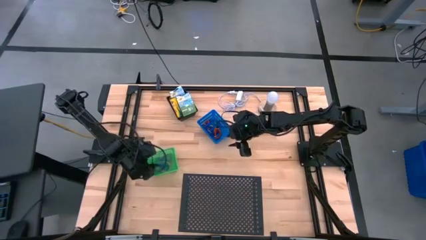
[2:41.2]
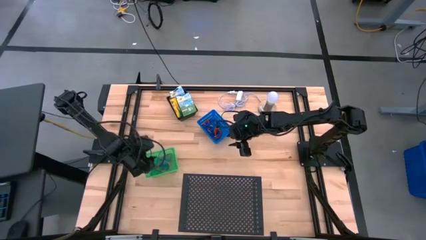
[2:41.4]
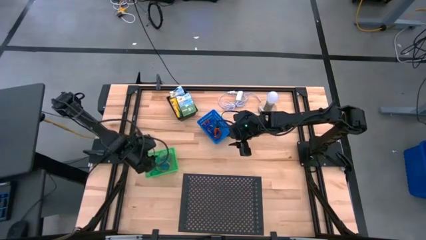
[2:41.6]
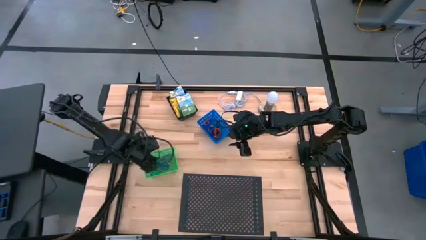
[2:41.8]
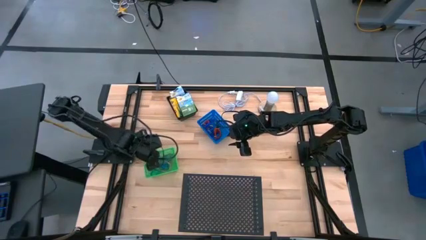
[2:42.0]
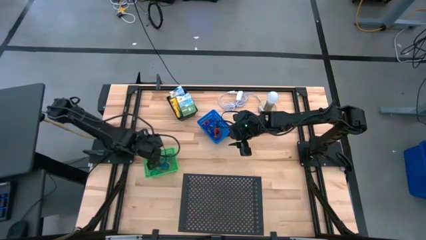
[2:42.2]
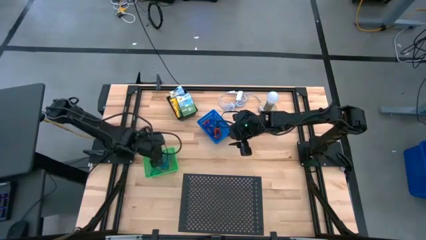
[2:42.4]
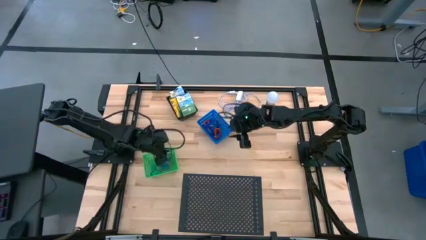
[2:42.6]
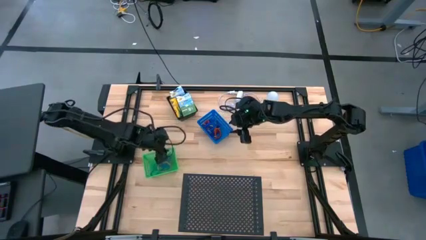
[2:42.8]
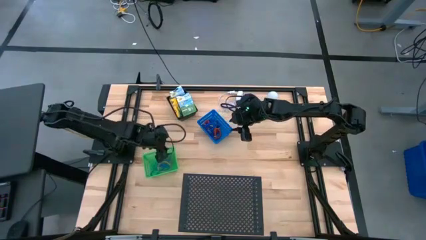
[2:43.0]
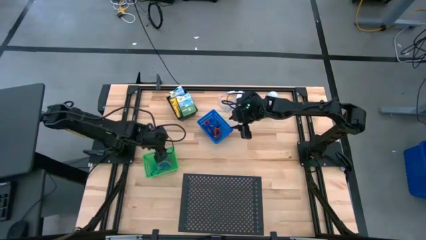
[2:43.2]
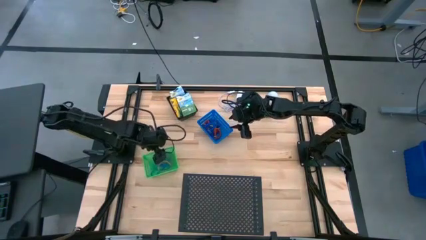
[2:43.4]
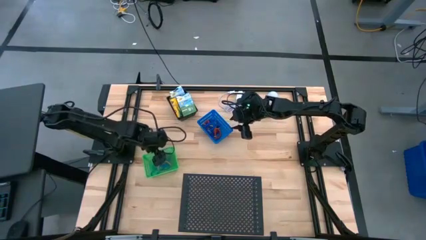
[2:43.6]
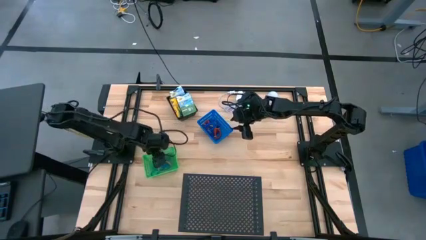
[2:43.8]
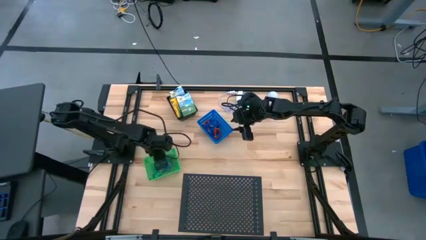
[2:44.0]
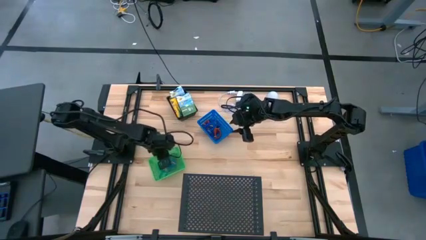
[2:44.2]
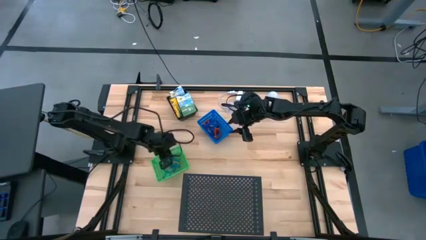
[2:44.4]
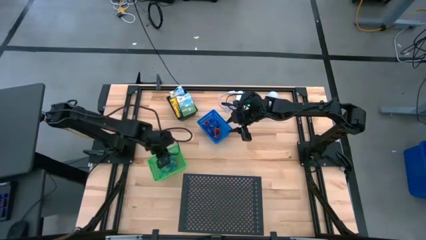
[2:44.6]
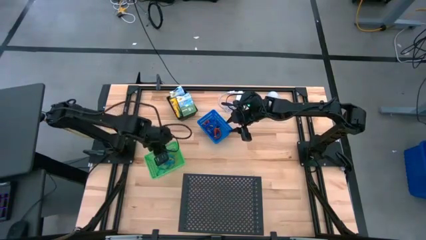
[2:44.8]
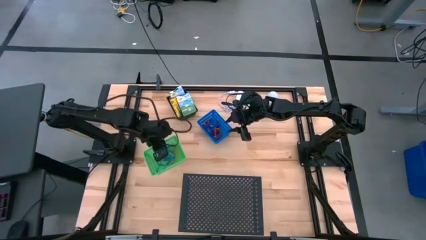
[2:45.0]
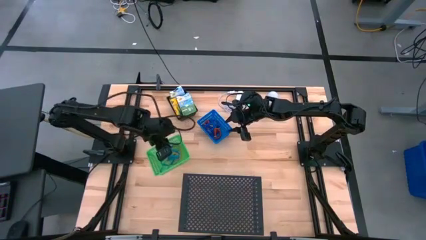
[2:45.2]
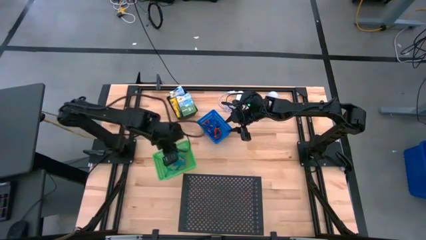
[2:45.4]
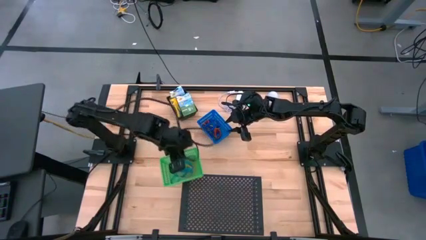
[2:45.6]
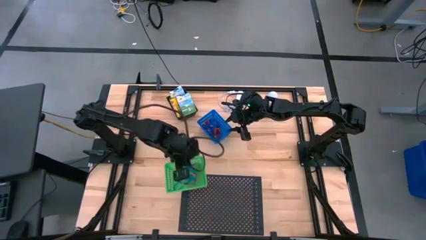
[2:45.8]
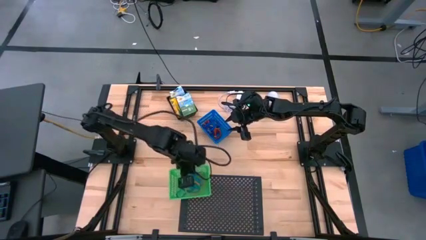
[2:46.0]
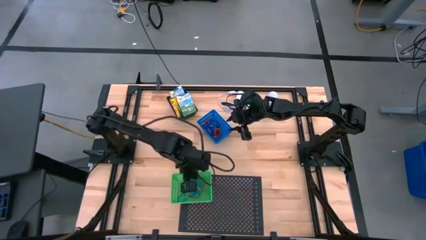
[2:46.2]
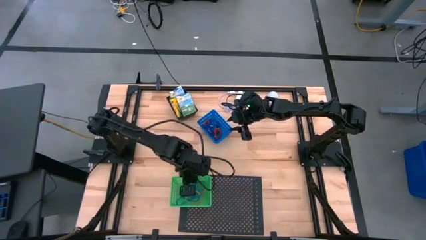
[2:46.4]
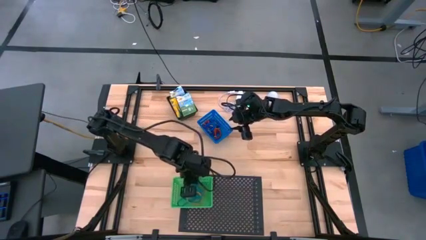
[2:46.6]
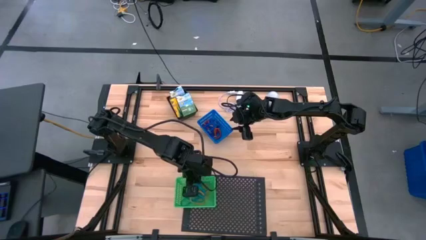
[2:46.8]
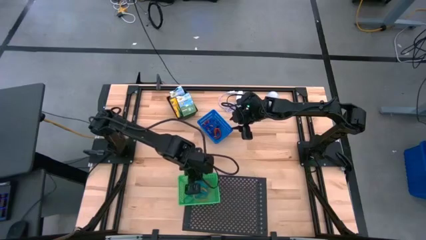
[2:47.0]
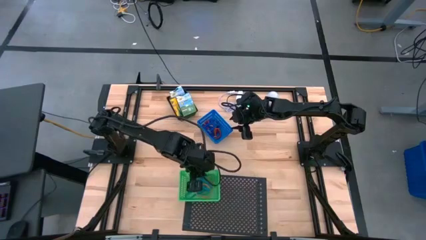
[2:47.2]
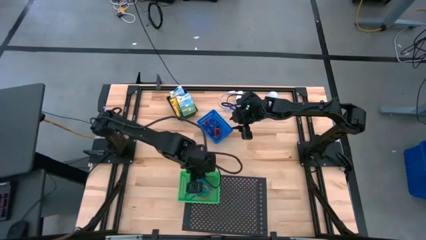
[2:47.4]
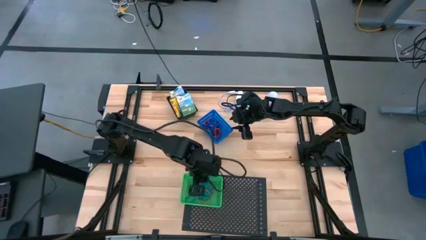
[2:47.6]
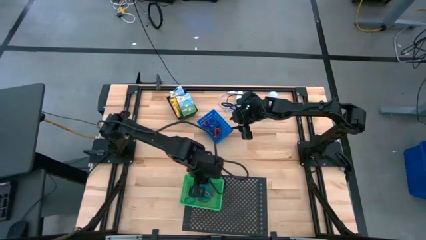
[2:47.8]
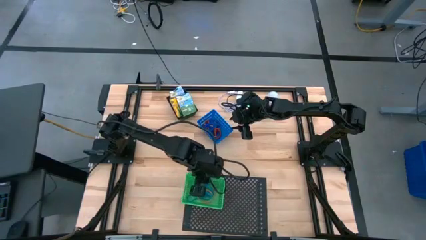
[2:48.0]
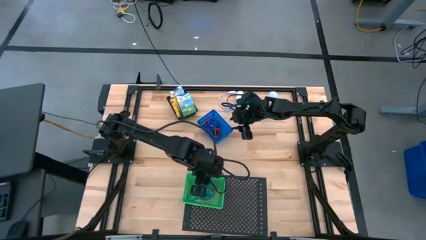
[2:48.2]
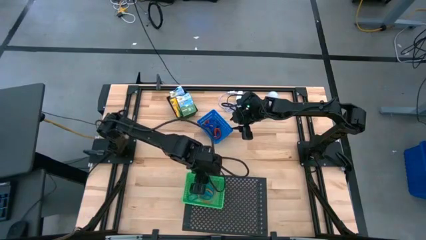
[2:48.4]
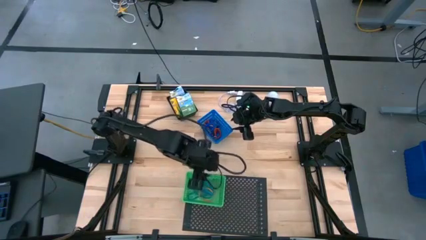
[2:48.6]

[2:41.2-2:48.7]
Task: Pick & Place Office Desk Supplies
Put the green bin on the shelf

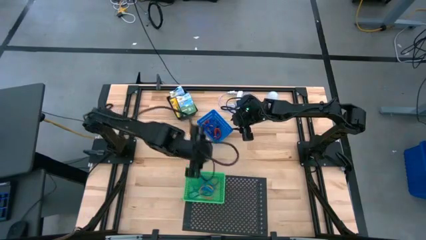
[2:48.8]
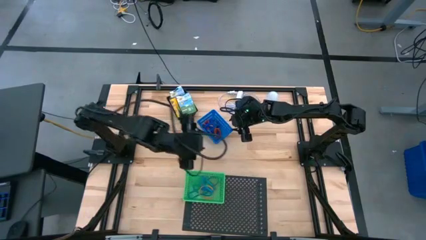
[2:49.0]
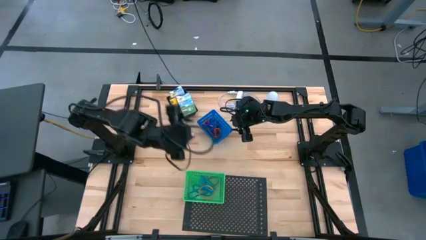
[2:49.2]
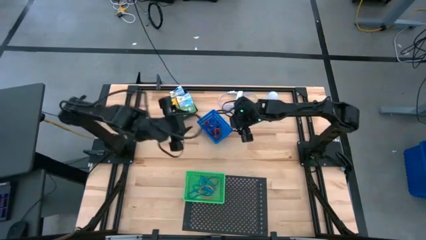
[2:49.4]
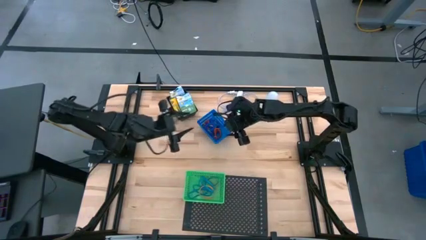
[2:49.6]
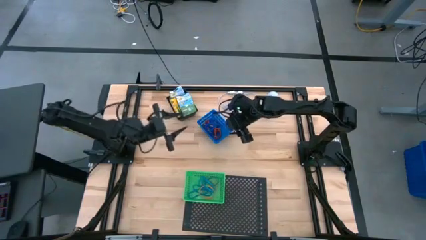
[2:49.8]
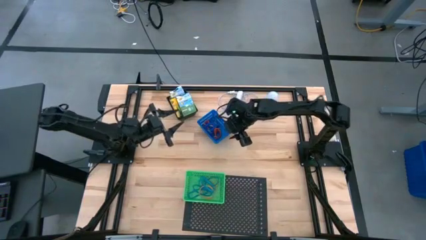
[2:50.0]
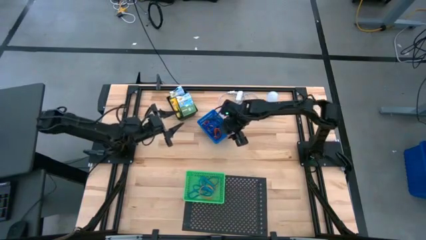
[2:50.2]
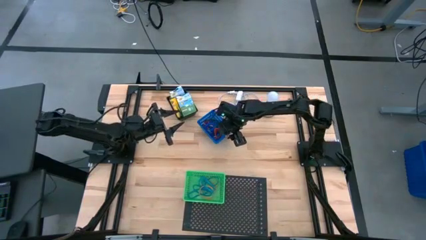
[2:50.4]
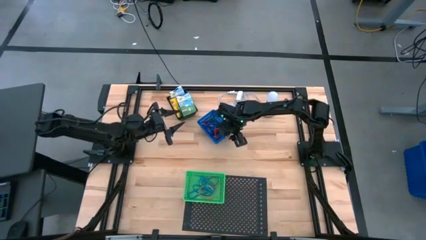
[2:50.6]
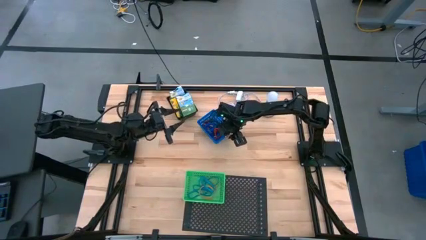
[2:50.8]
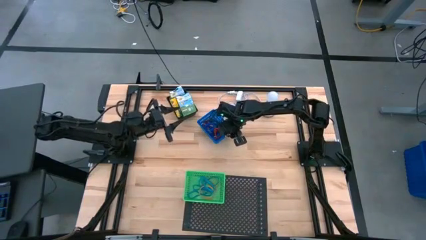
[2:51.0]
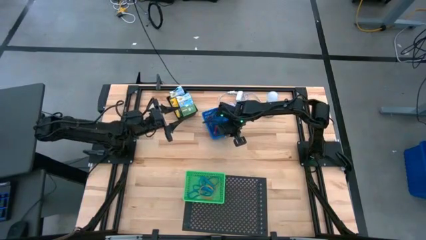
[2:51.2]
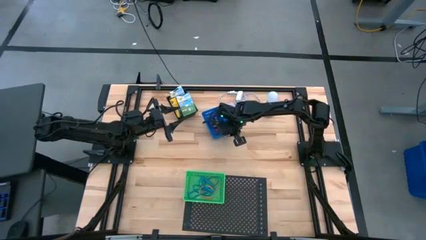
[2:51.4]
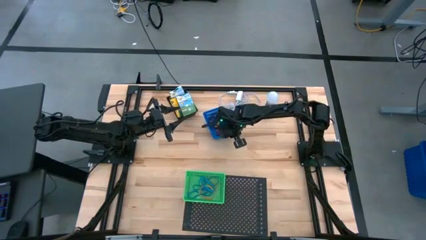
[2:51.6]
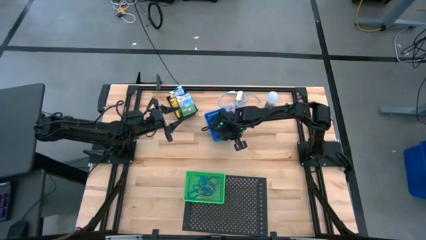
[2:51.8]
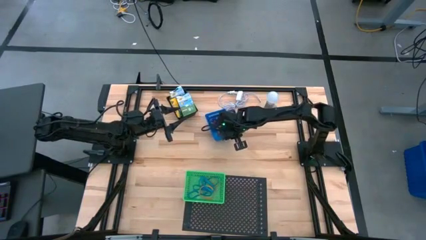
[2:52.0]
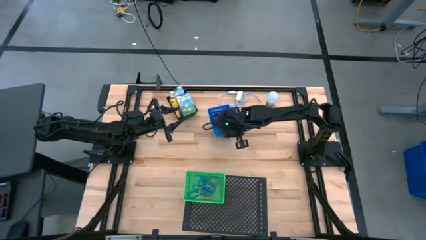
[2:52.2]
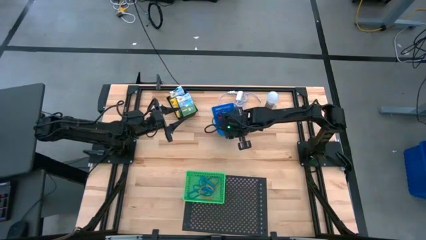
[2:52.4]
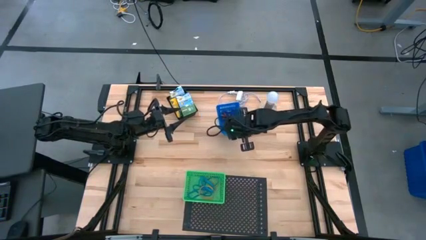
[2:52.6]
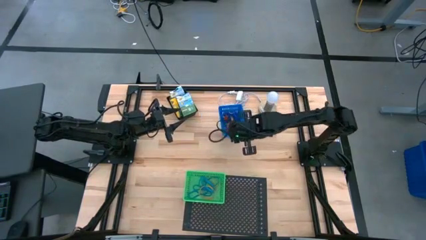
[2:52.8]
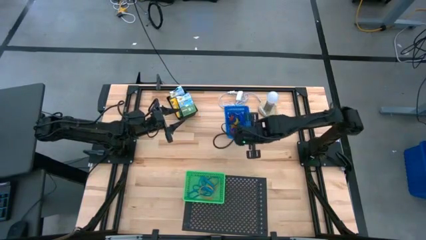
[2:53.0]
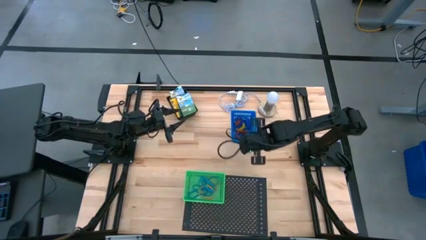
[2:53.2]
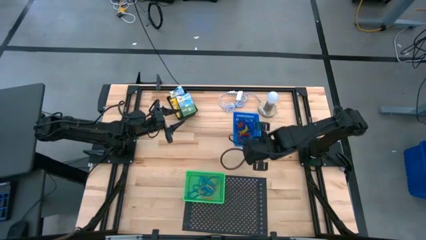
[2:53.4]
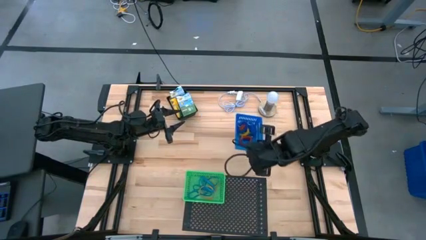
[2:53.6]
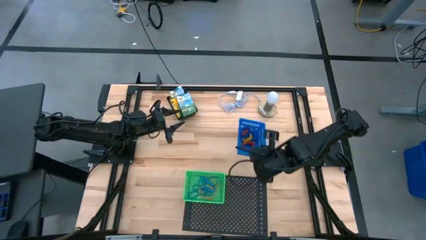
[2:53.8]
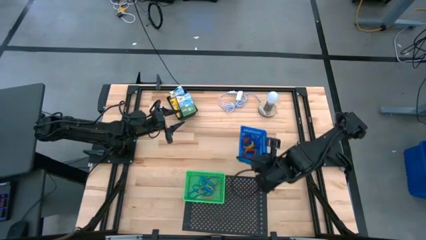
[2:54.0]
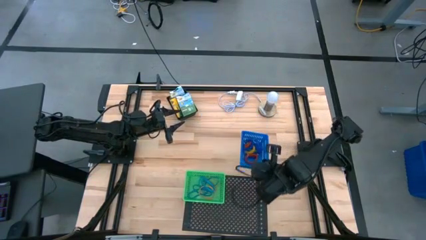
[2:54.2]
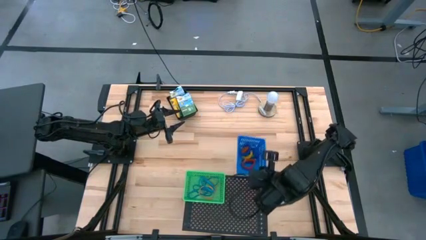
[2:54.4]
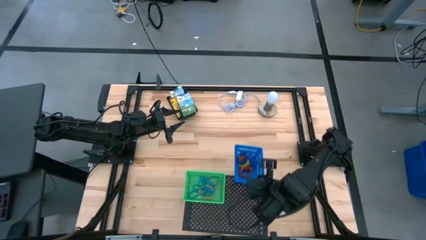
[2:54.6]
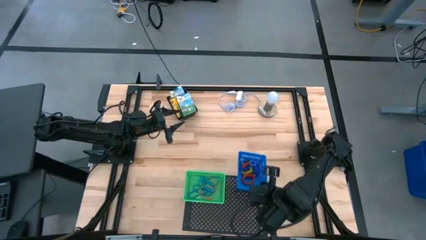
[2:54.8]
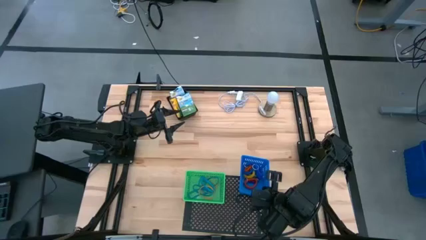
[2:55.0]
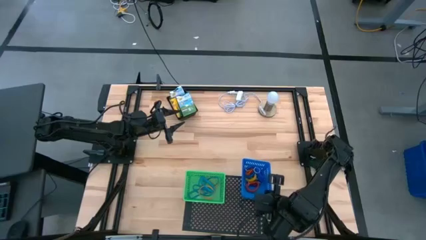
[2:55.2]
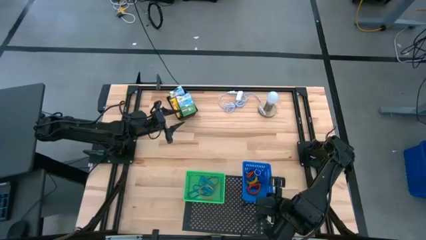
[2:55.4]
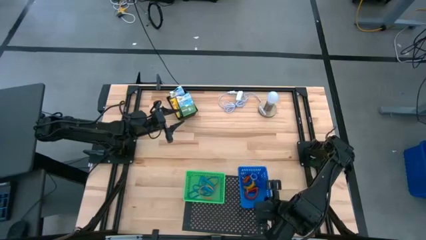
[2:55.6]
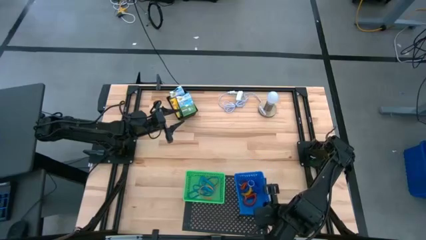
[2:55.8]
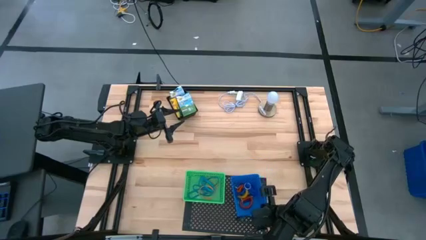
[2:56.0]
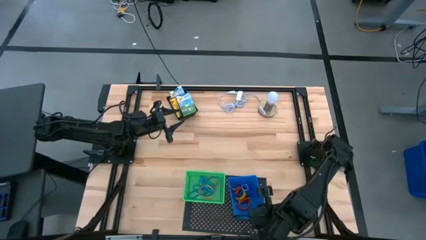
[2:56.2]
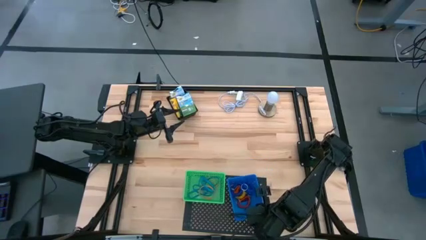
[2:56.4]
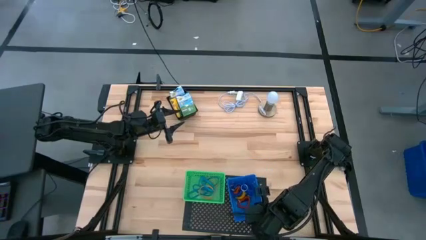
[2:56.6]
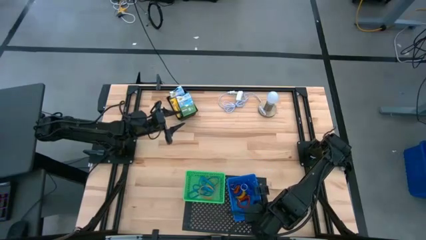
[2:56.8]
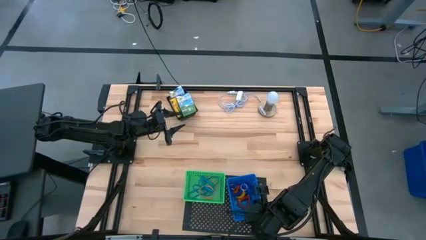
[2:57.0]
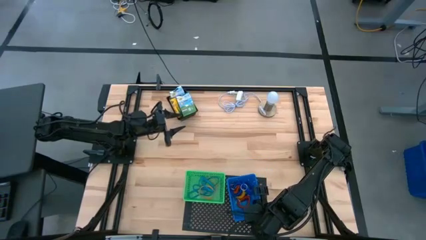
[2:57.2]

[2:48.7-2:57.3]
Put the blue bin on the shelf
